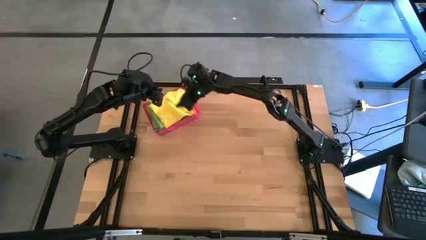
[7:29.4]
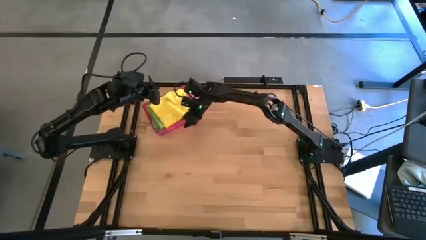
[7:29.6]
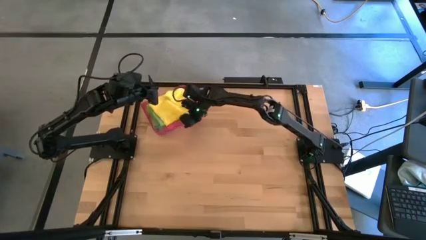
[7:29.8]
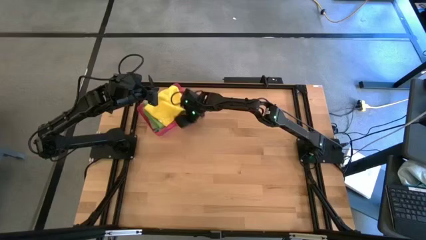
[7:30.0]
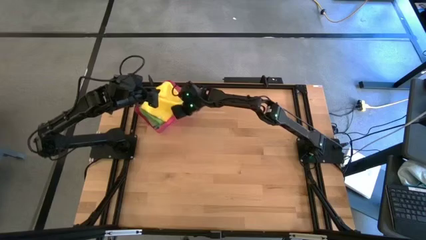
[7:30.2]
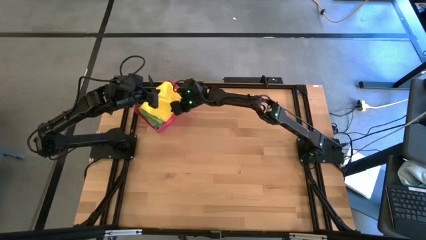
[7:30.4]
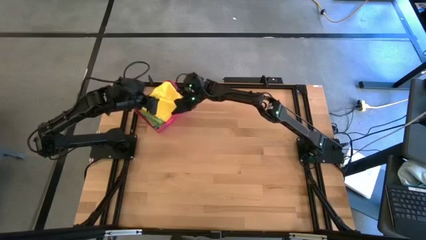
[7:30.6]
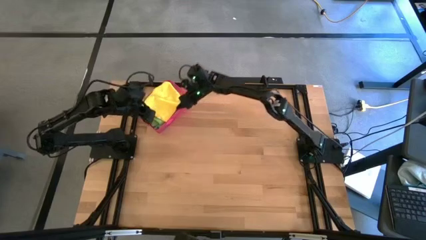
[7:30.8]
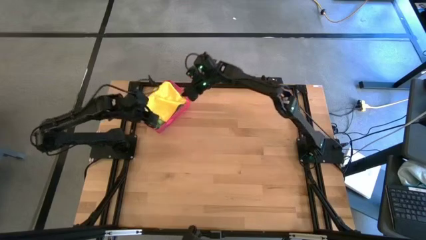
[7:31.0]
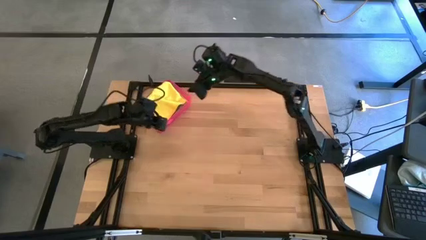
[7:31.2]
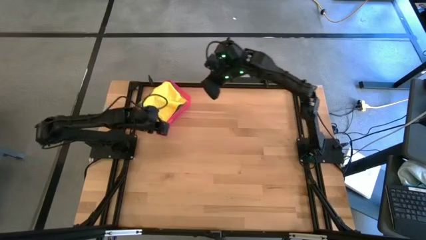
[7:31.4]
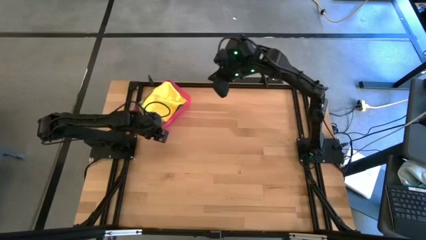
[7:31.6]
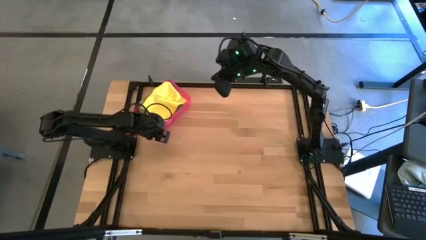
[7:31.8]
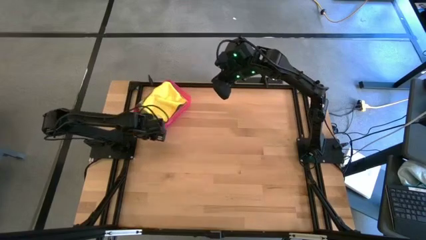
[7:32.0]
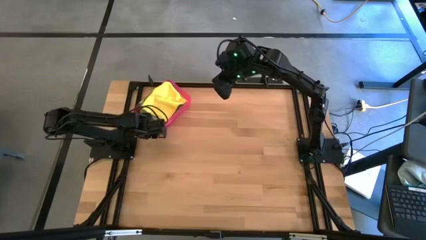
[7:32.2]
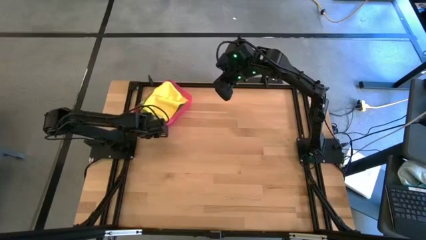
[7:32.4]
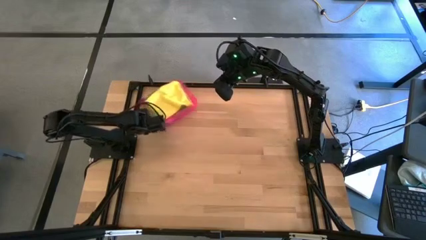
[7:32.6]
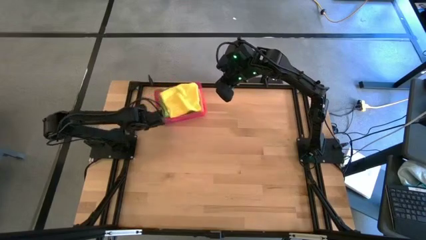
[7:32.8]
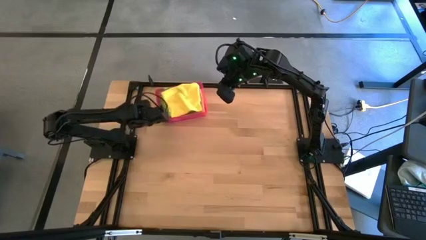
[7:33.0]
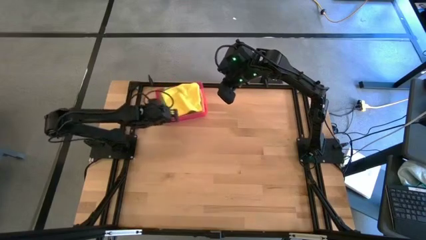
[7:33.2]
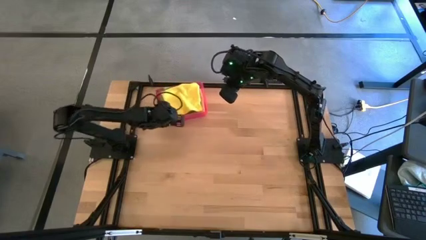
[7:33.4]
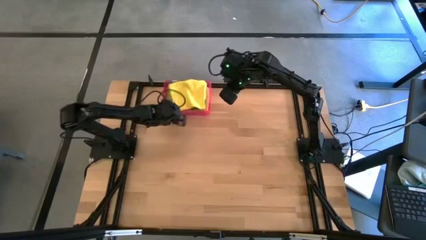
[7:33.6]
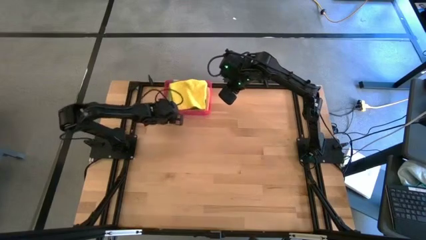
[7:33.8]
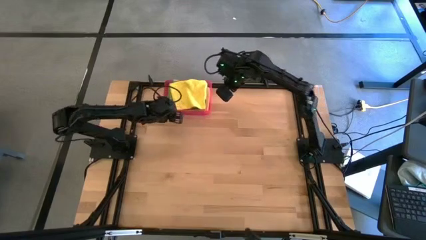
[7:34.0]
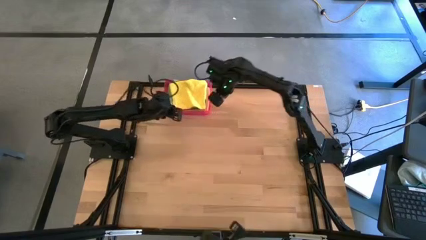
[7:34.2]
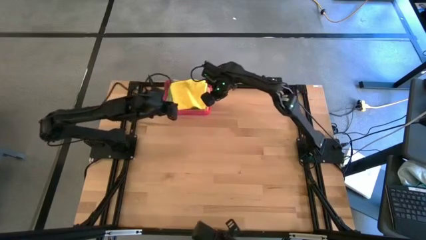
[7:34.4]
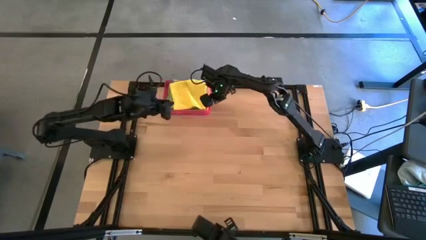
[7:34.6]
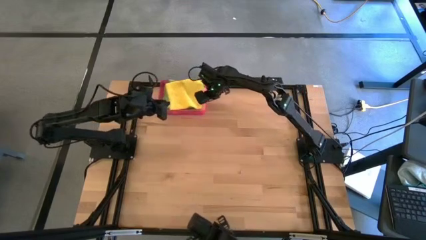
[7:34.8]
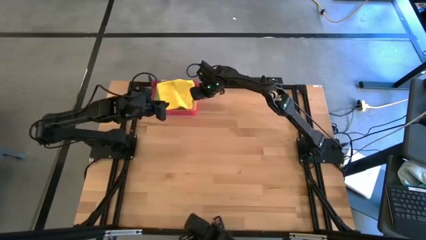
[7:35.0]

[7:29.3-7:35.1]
Task: Fold microfiber towels
Adjust the pink bin to the top left of the table

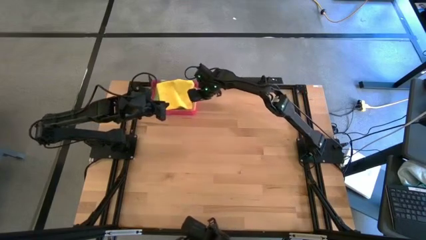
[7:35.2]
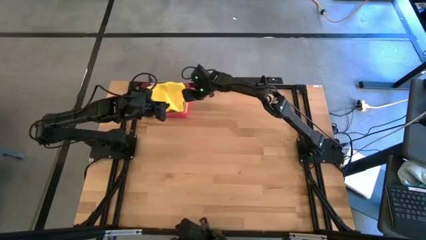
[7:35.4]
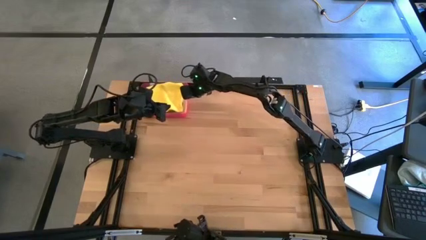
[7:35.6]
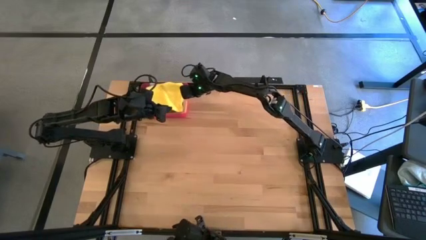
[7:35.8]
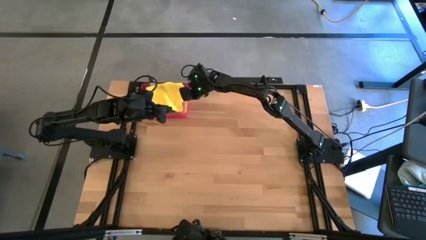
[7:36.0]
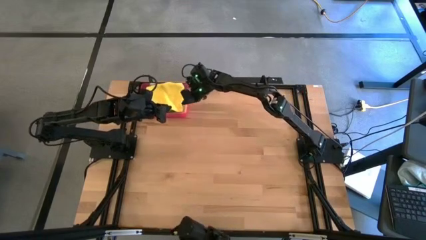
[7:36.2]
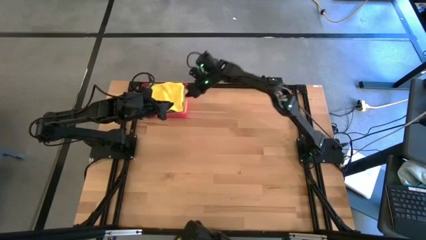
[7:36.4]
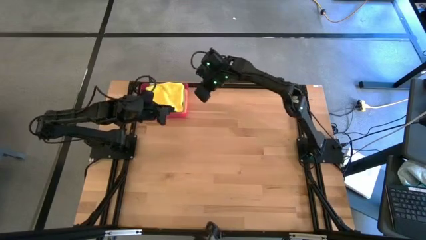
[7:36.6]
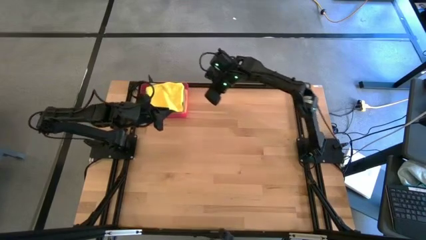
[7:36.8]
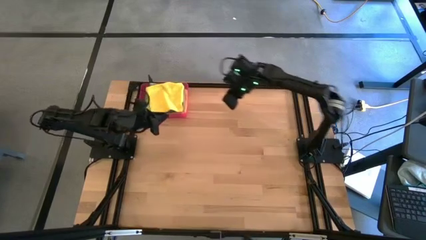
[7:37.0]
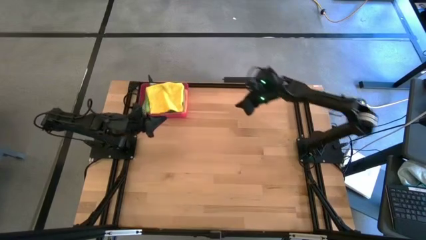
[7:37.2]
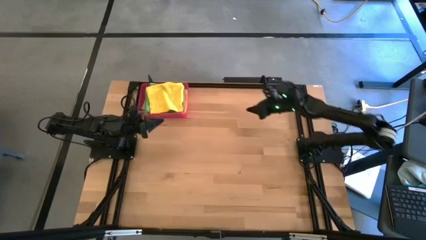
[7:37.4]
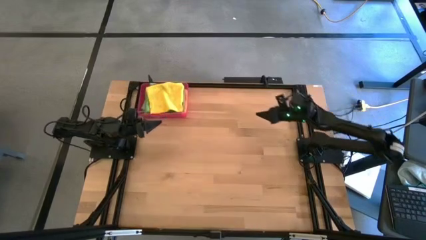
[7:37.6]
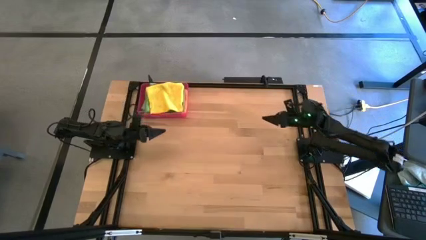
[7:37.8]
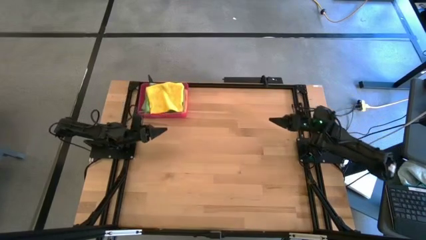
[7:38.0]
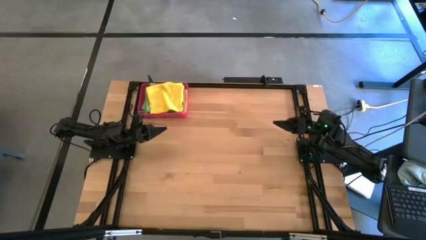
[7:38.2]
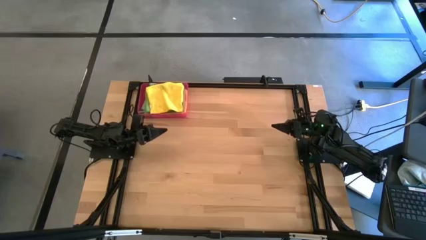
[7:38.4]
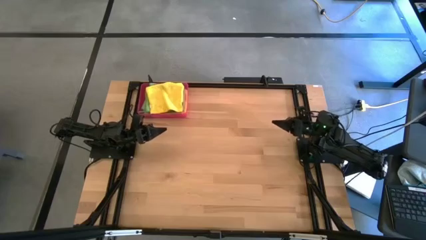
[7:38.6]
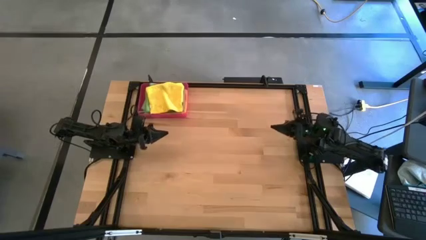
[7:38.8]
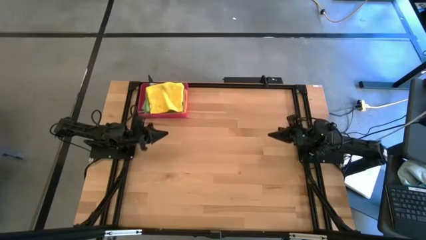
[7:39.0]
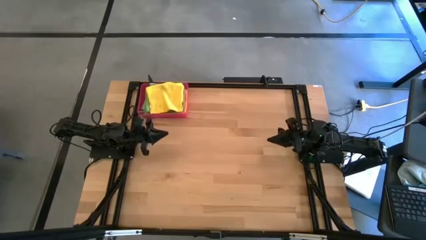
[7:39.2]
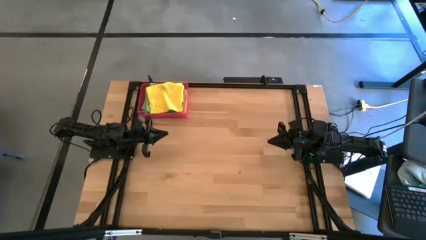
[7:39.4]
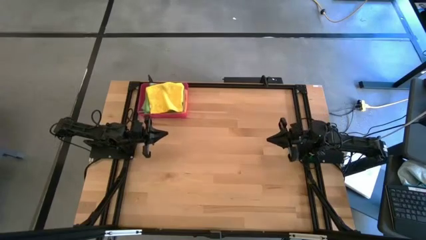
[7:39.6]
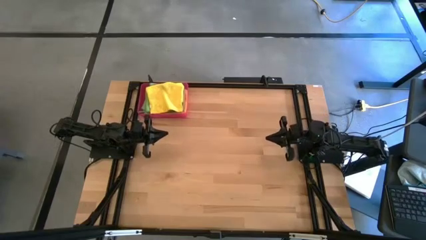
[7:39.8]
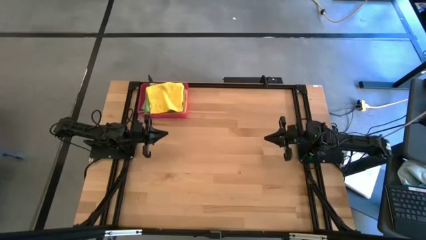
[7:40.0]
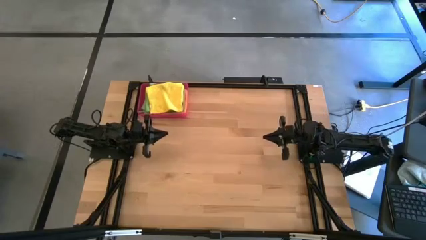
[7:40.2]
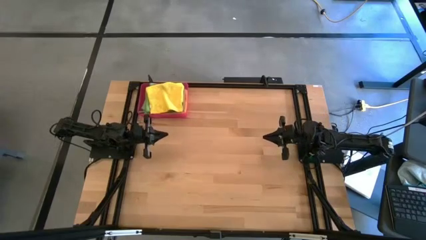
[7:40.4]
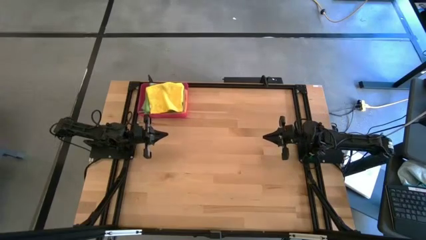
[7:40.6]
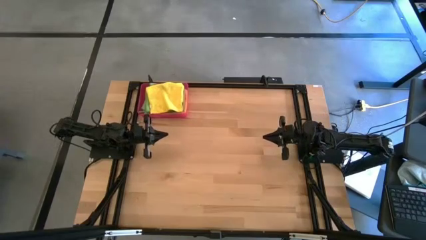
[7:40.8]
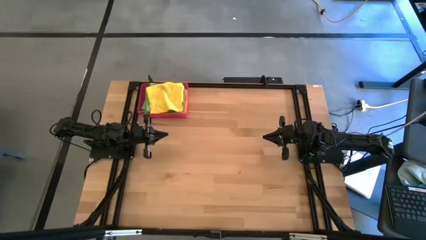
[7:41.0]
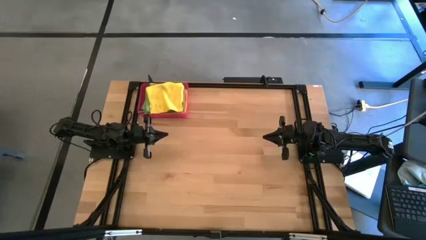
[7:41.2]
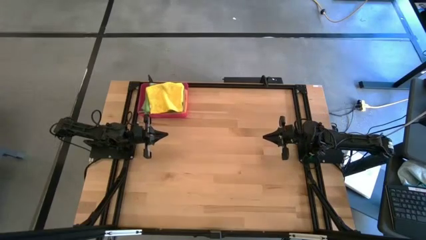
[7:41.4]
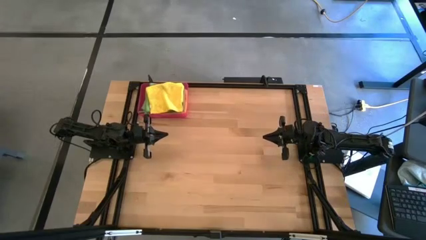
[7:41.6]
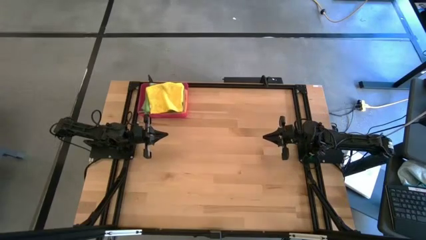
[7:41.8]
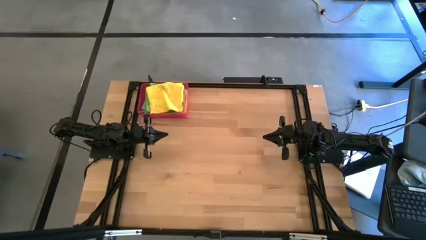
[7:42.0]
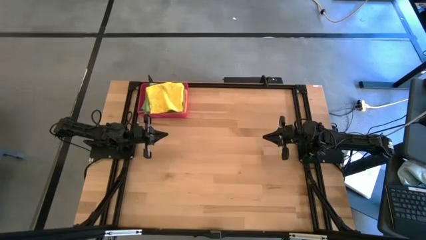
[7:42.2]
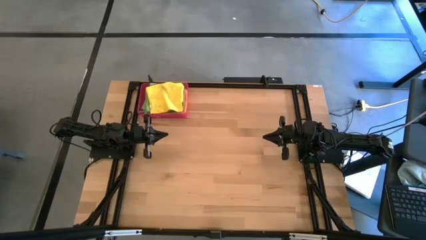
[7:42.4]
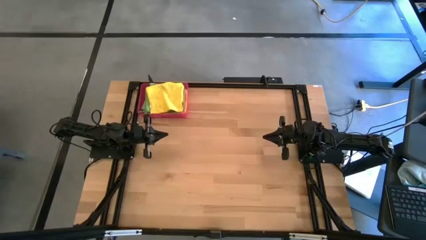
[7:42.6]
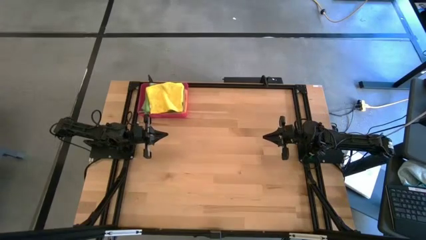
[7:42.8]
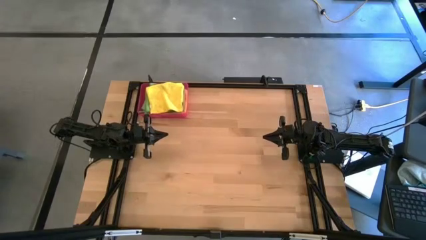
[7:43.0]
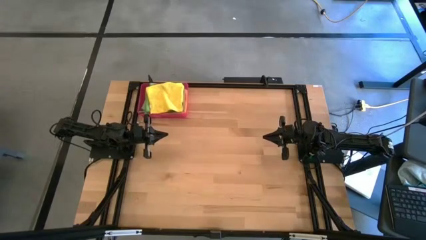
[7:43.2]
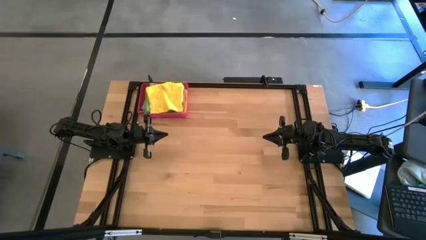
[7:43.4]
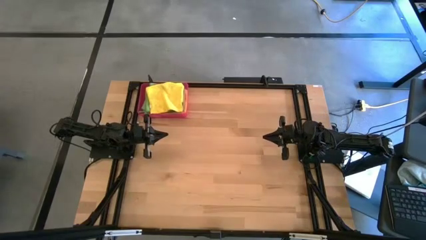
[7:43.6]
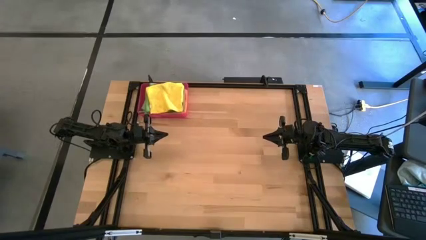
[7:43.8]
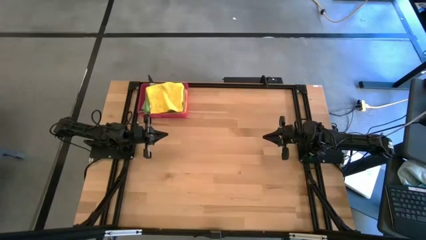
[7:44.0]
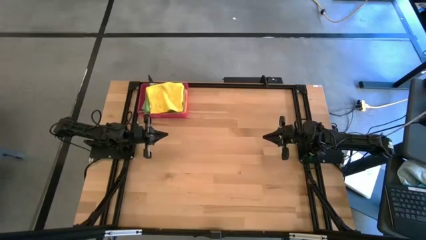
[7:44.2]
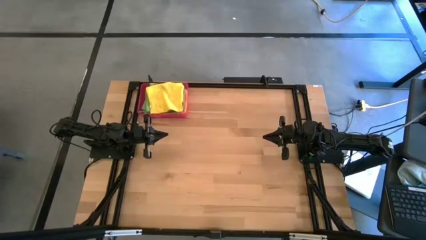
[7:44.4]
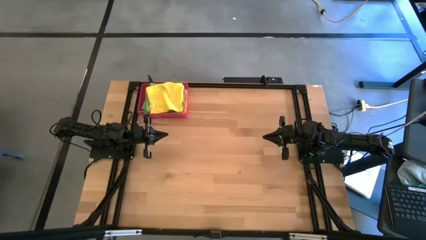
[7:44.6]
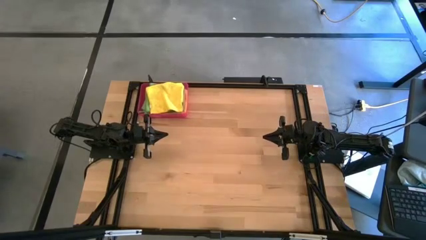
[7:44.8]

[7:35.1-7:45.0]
Return to Home Position
